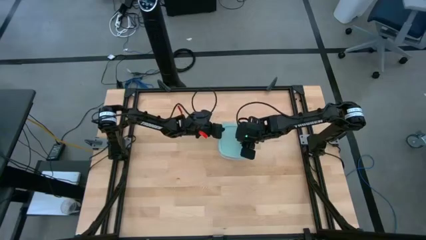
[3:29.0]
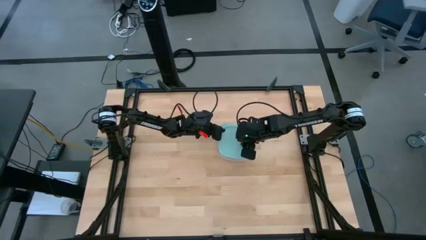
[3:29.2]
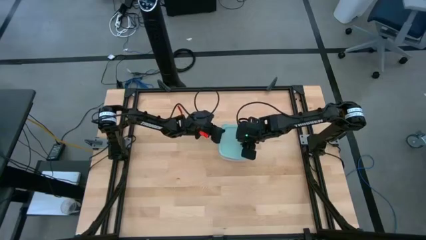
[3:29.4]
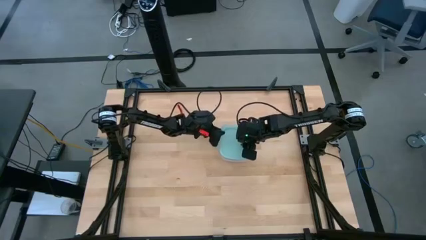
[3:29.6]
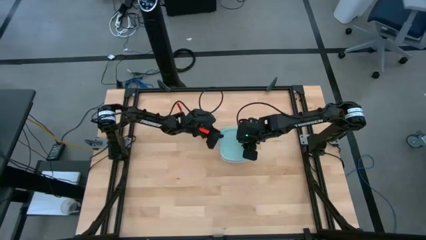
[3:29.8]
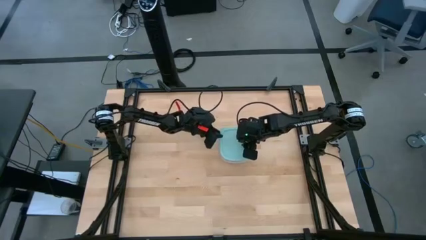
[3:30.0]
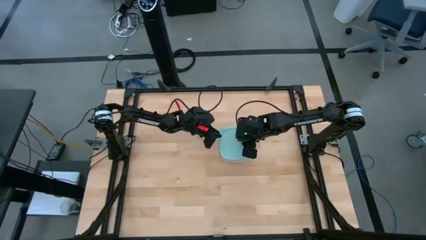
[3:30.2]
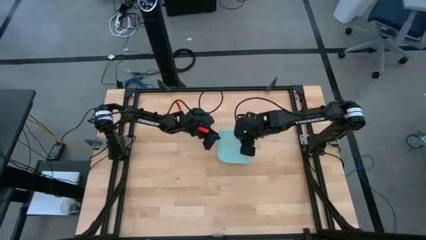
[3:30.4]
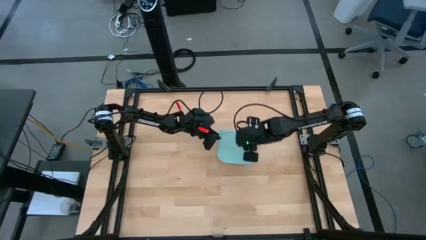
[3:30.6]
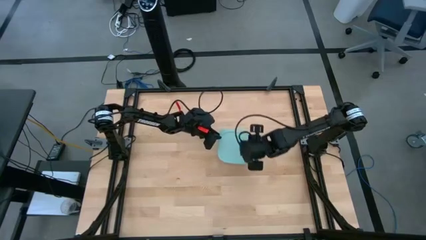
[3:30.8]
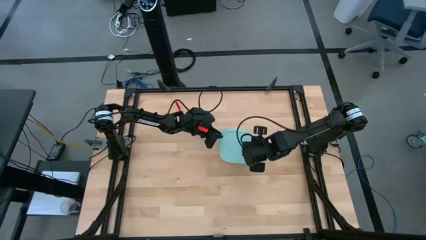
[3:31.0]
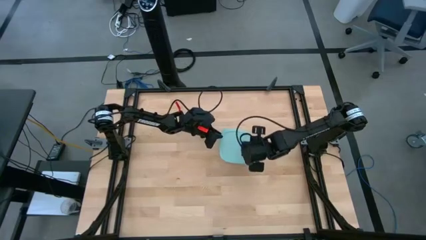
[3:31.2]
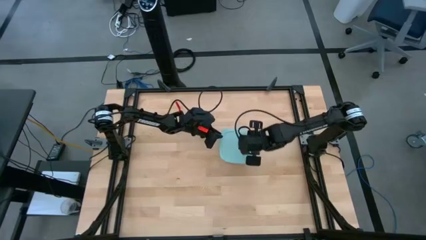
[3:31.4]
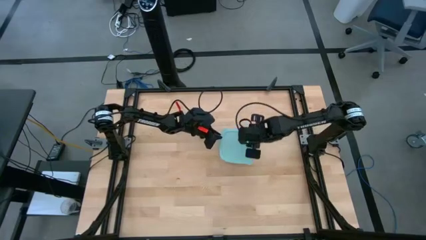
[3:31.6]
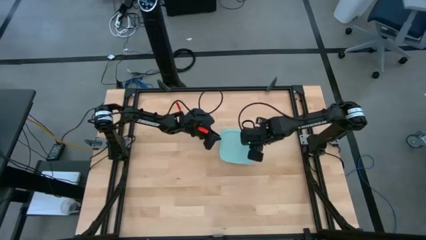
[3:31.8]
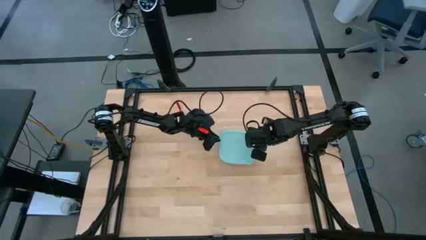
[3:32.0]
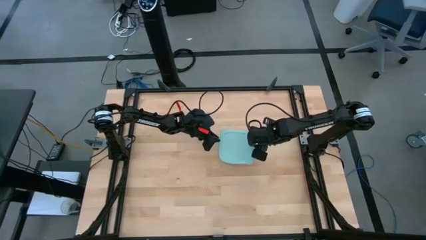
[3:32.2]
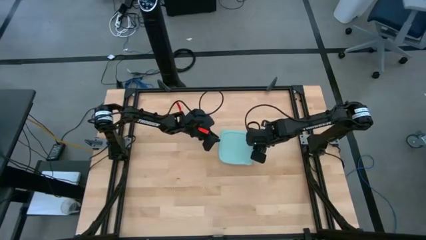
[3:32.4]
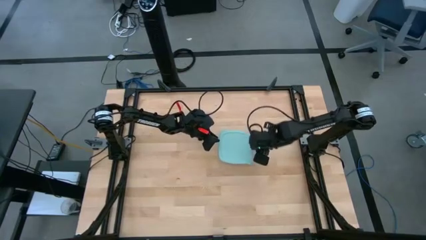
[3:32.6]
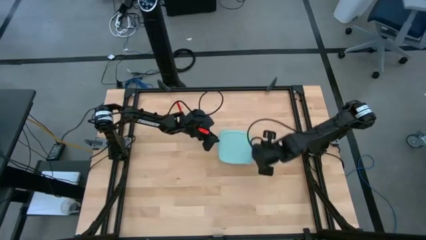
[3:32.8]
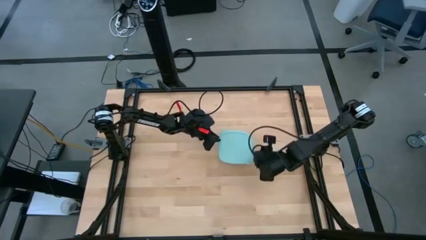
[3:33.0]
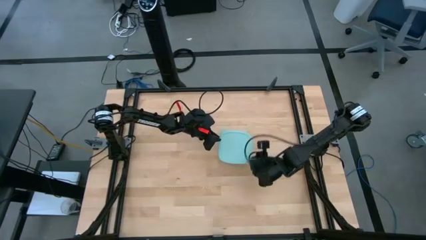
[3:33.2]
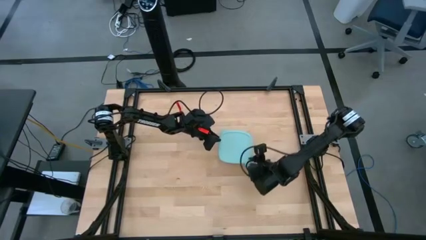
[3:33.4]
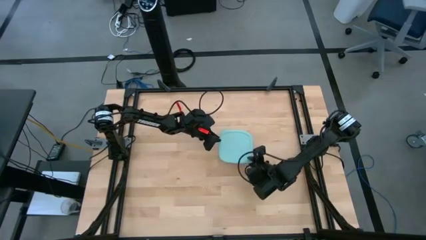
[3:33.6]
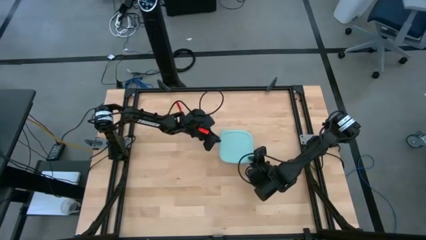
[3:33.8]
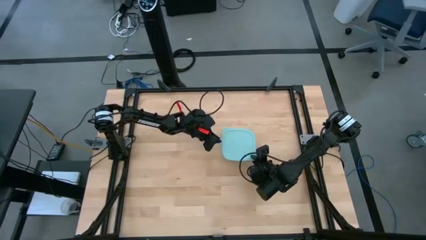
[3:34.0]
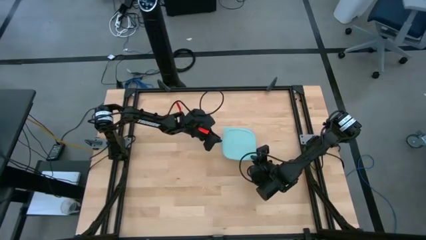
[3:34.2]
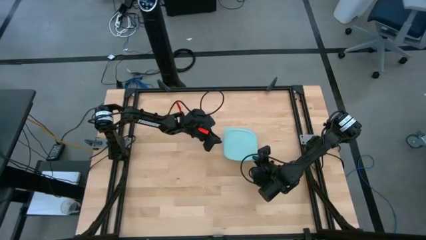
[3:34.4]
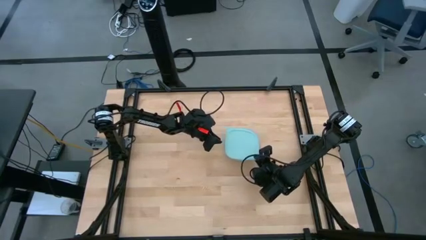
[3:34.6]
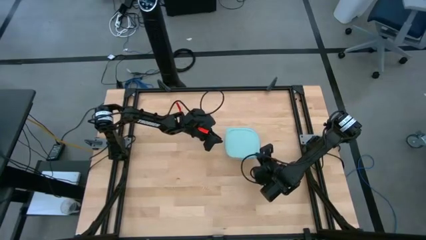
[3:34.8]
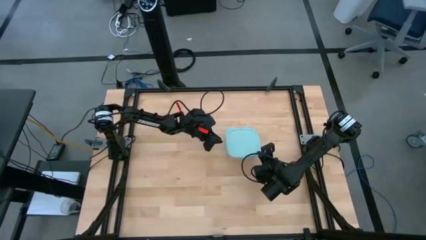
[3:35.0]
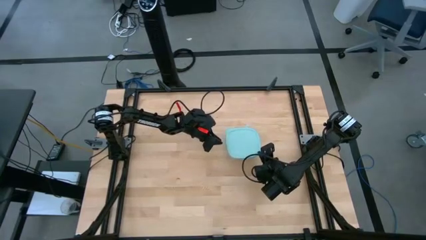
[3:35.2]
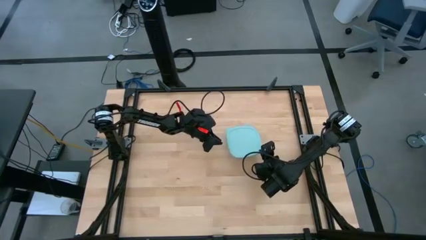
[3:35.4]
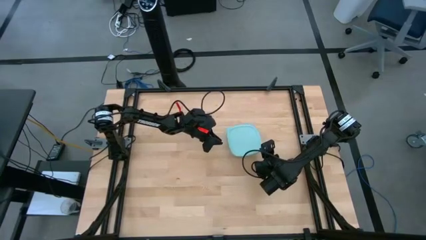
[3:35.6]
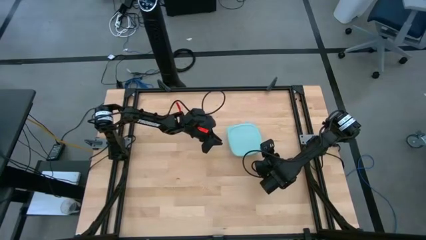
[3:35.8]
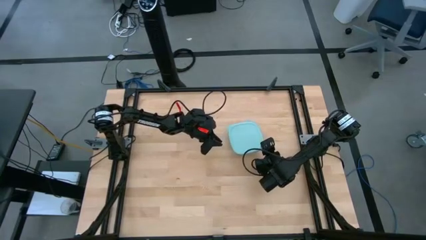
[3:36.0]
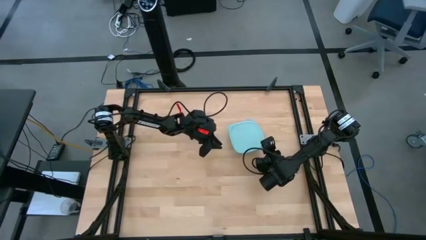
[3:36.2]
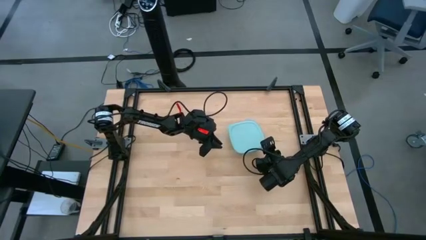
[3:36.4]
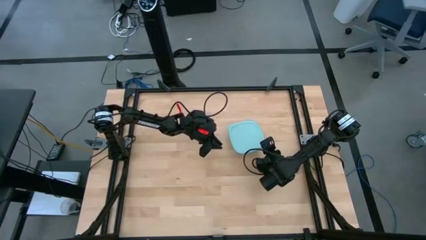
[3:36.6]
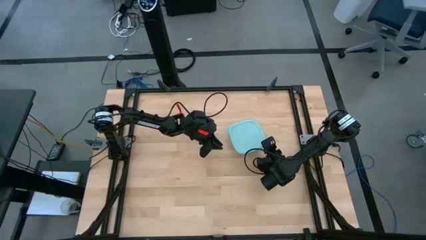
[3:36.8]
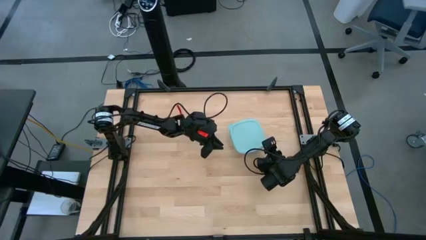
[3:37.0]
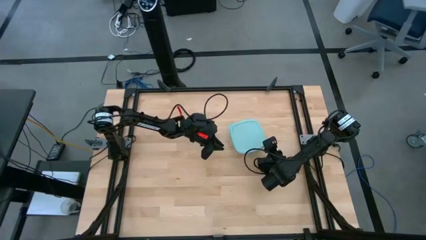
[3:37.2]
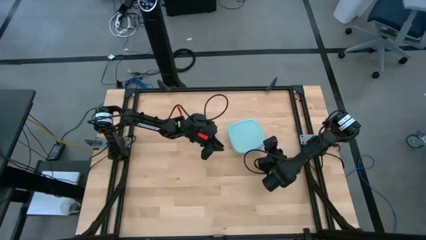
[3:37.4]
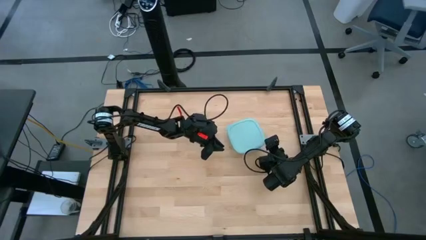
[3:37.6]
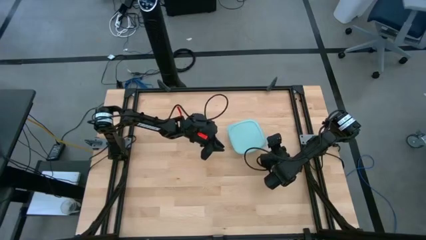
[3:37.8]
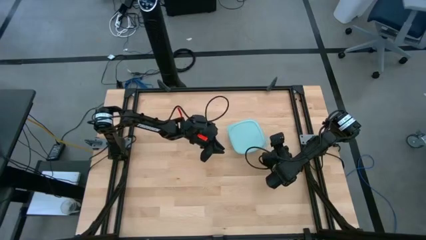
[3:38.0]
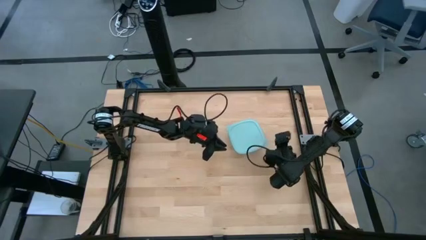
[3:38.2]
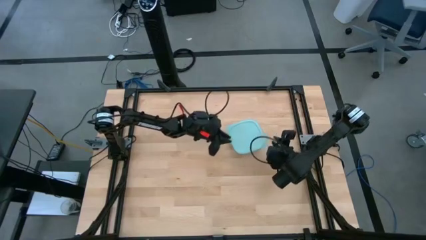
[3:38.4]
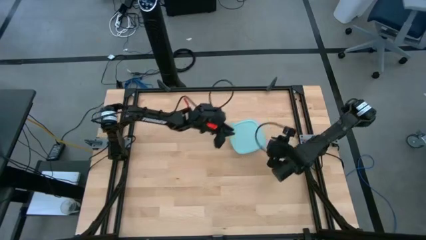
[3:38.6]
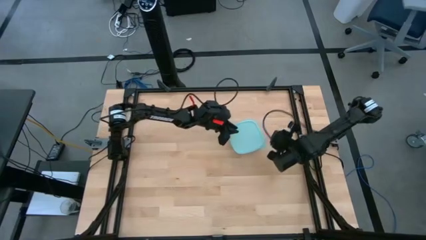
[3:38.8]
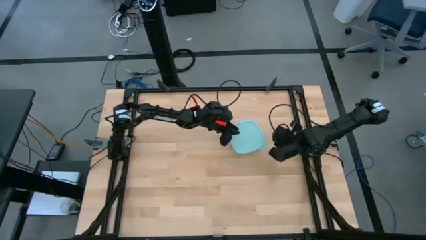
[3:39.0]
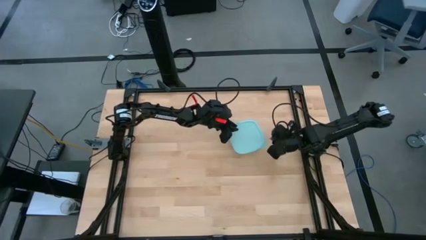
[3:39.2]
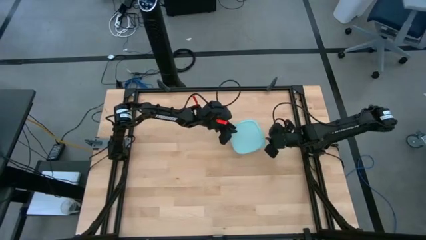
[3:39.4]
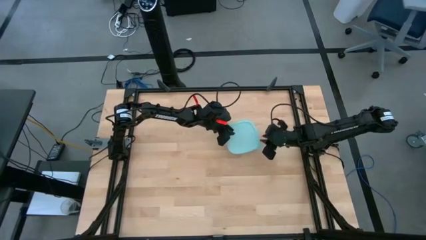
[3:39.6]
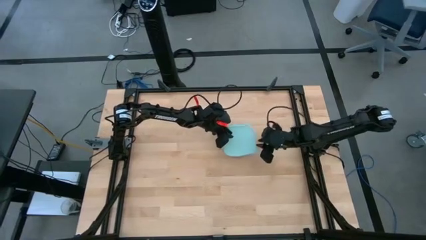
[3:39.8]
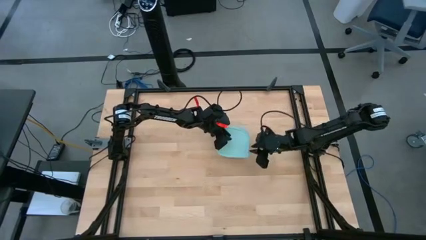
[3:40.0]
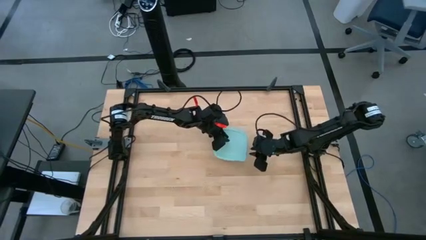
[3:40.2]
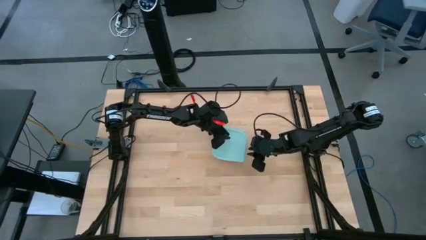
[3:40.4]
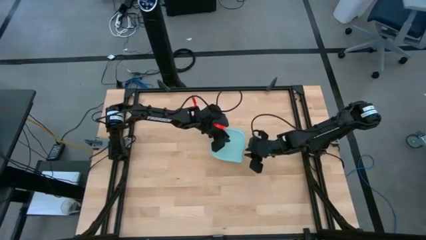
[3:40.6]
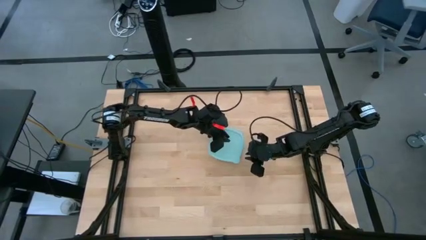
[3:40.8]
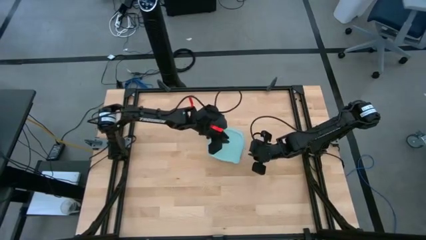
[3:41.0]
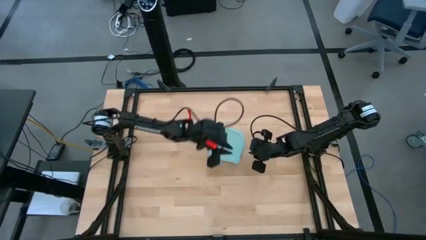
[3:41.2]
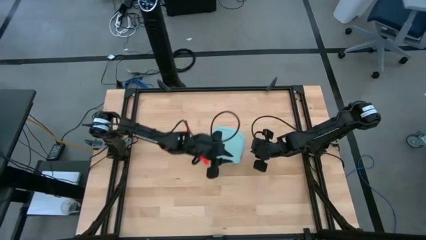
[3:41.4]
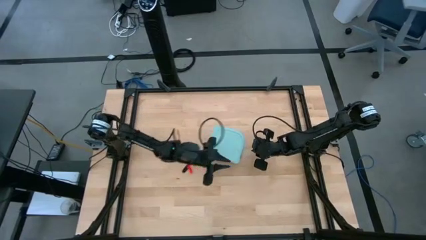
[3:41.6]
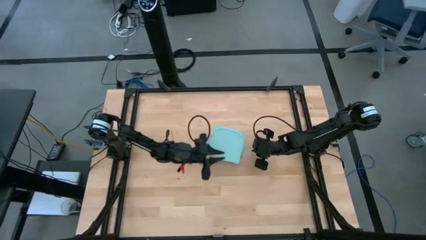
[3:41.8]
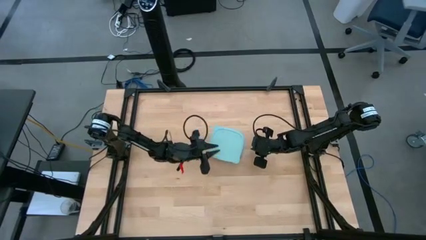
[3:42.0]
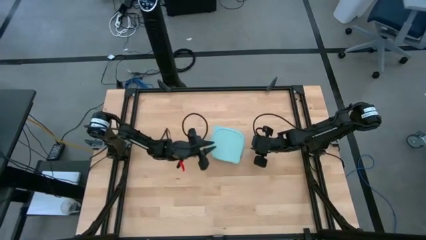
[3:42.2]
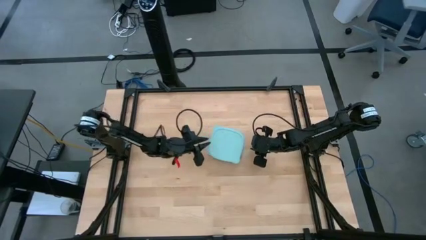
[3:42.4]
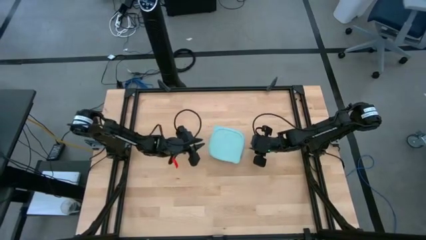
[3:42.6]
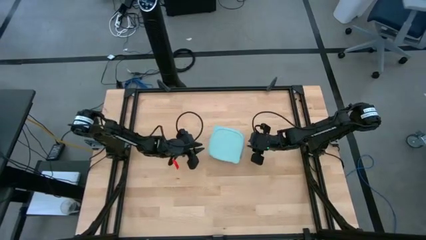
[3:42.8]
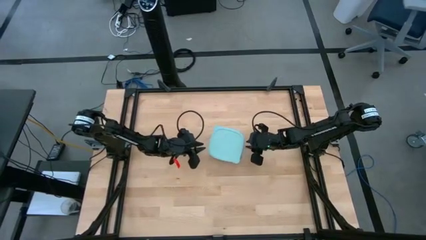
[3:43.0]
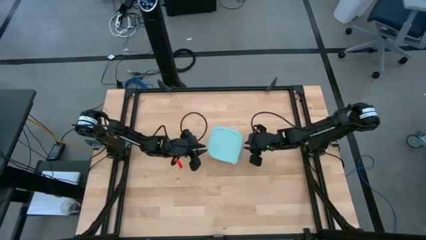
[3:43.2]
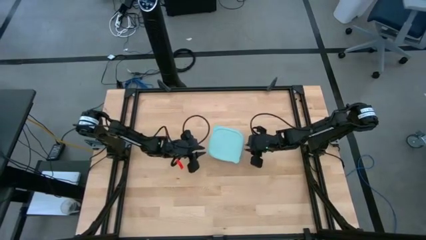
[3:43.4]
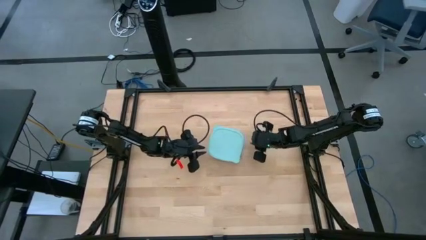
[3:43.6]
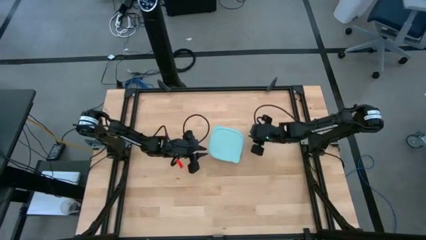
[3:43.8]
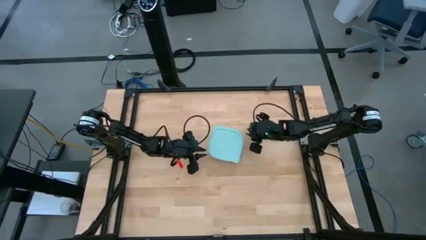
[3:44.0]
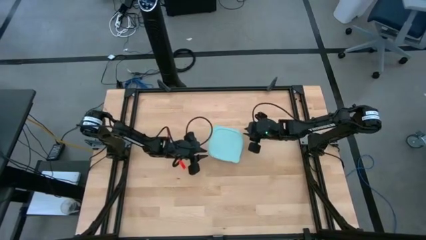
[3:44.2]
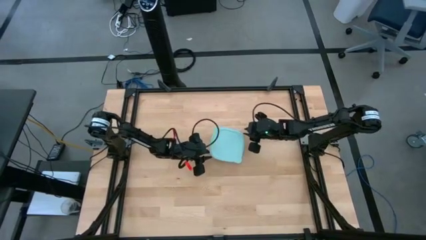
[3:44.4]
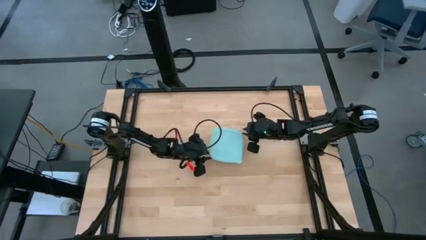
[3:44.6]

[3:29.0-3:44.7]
Task: Roll bandage
Close the transparent tupperware

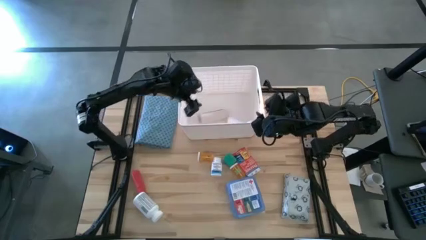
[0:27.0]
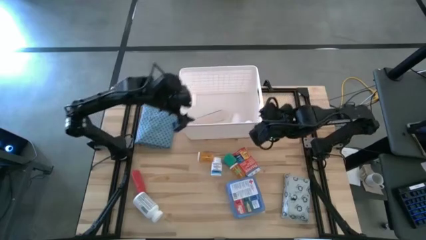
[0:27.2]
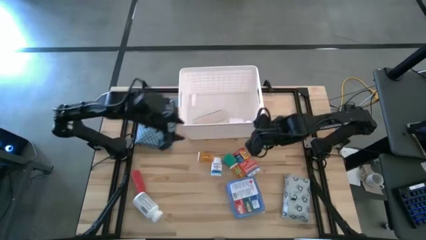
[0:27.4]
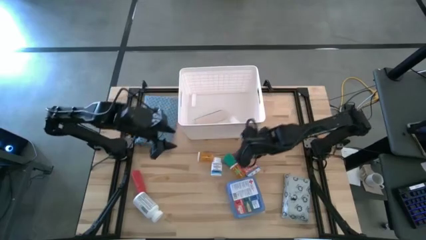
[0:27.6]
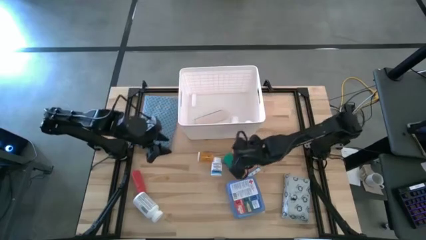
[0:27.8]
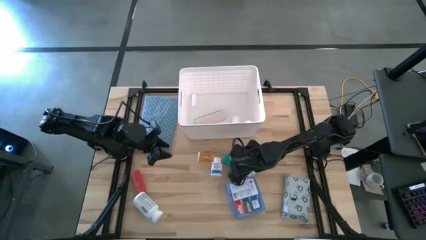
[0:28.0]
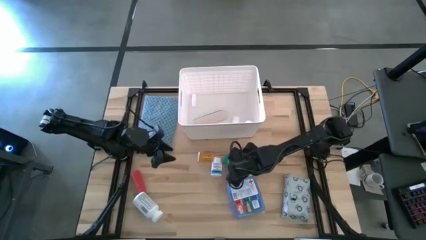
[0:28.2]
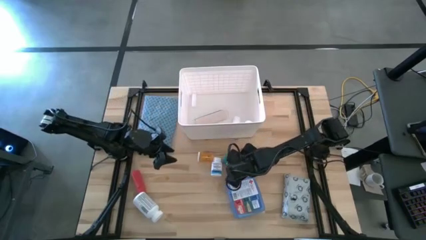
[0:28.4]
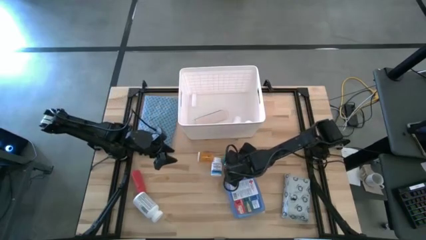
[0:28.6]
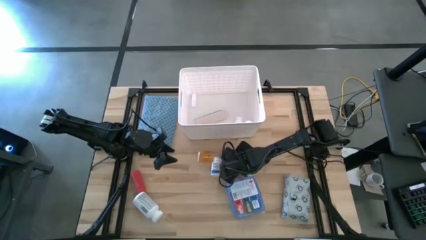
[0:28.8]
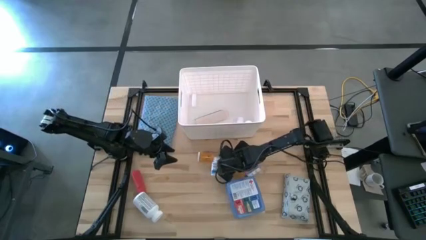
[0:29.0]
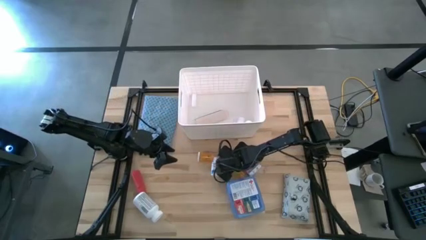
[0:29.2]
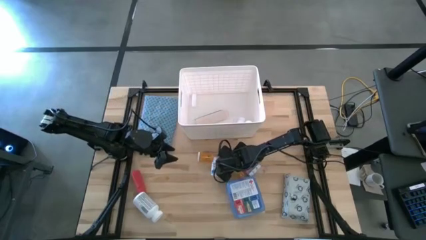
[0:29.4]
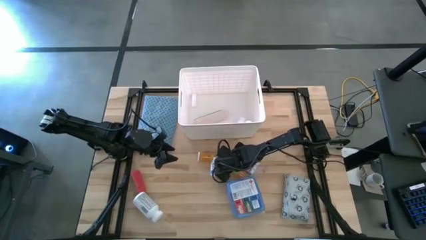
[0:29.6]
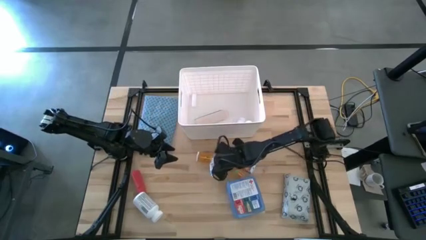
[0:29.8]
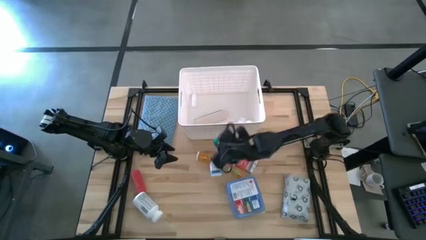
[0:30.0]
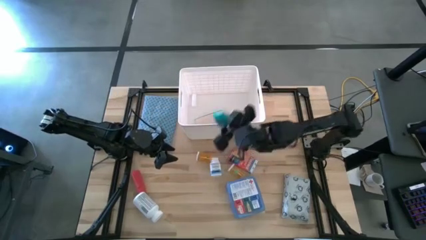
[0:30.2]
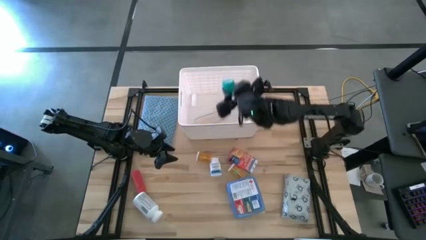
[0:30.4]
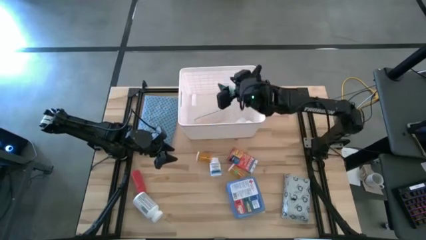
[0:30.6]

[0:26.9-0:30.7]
Task: Pick & place medical supplies in basket/bin
Put the green bandage into the white bin
